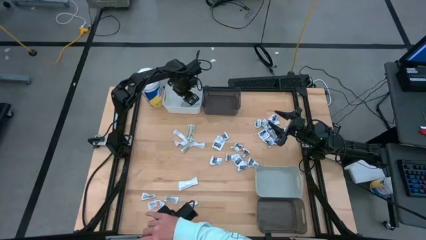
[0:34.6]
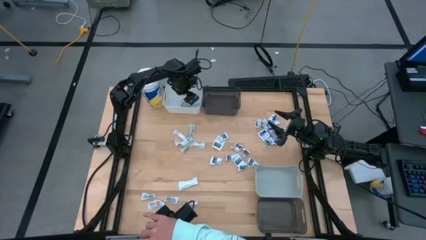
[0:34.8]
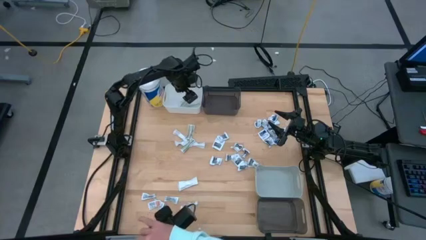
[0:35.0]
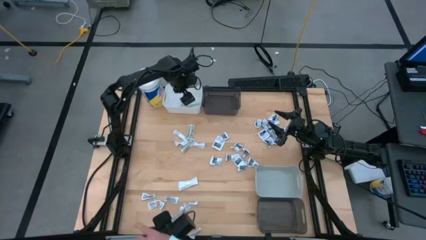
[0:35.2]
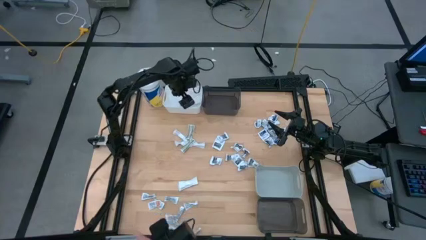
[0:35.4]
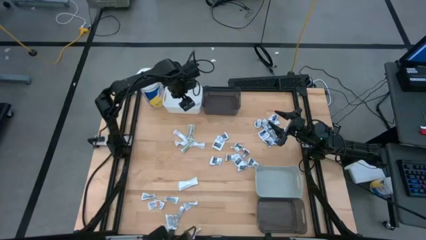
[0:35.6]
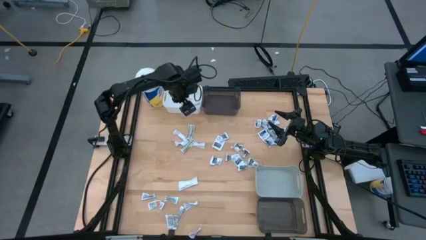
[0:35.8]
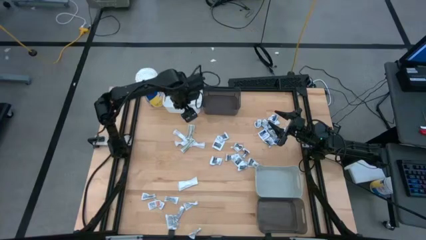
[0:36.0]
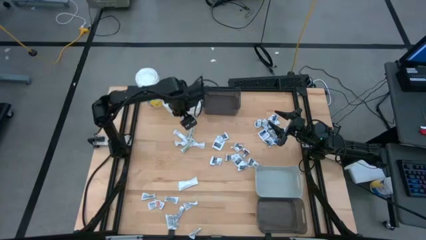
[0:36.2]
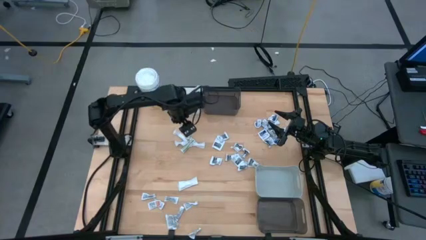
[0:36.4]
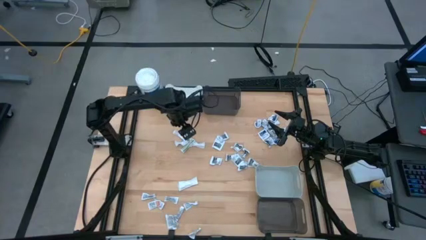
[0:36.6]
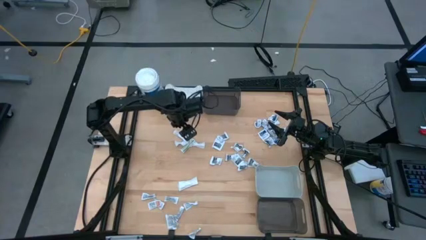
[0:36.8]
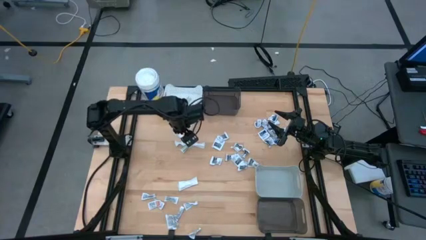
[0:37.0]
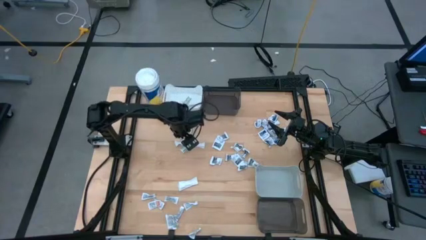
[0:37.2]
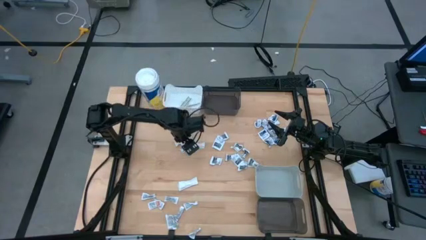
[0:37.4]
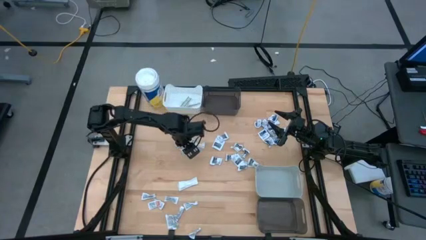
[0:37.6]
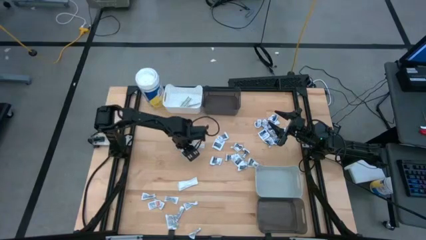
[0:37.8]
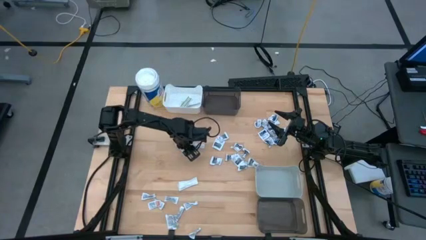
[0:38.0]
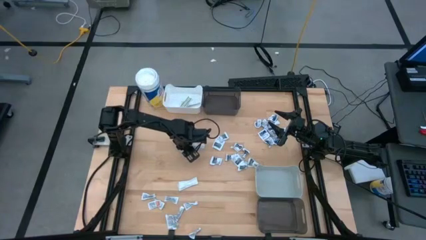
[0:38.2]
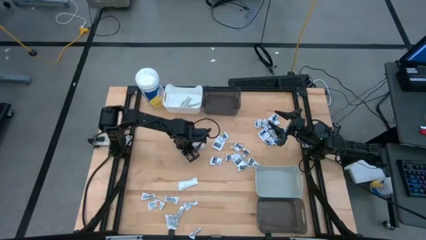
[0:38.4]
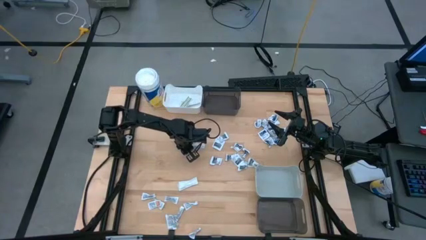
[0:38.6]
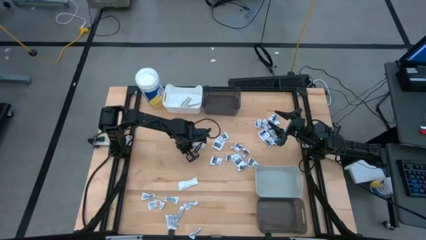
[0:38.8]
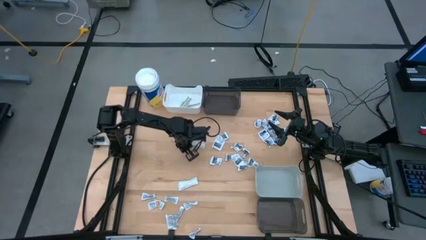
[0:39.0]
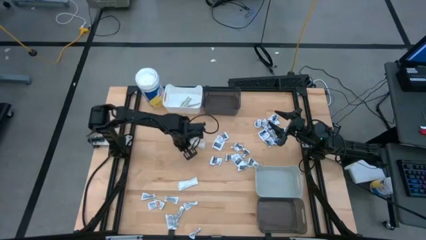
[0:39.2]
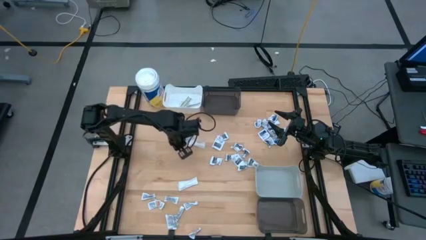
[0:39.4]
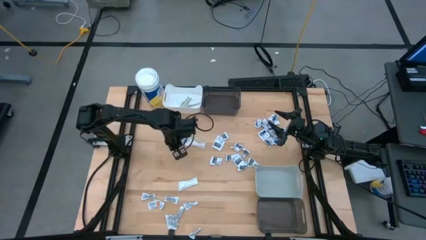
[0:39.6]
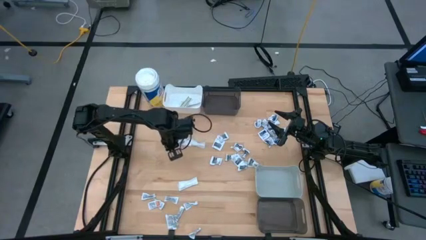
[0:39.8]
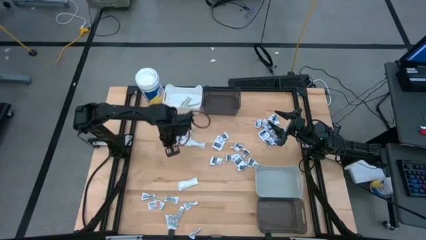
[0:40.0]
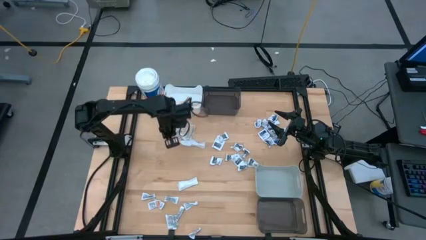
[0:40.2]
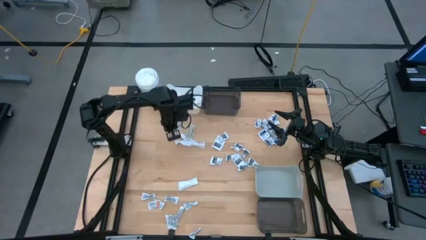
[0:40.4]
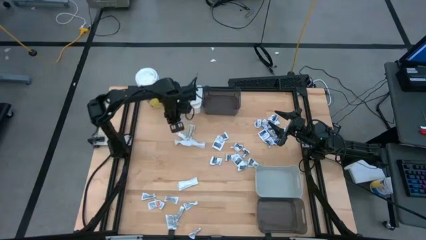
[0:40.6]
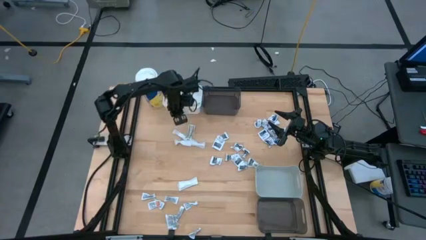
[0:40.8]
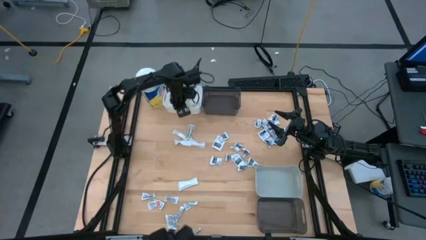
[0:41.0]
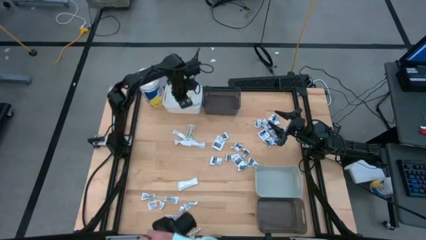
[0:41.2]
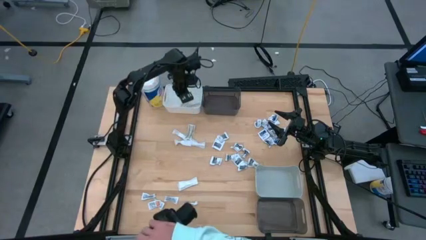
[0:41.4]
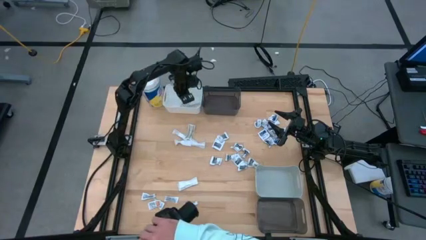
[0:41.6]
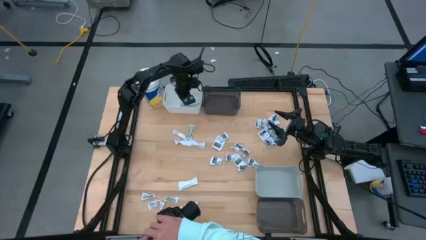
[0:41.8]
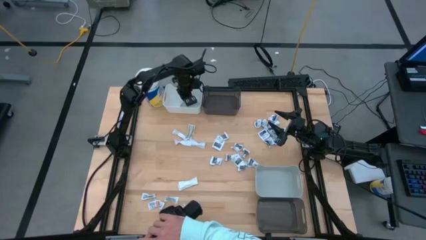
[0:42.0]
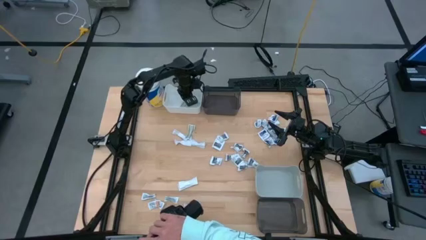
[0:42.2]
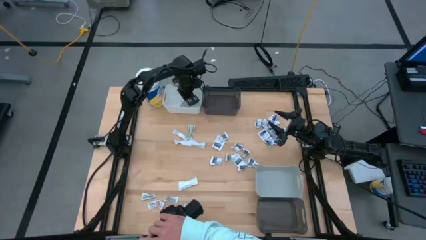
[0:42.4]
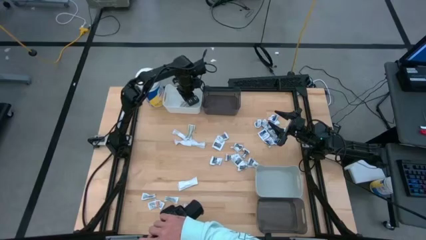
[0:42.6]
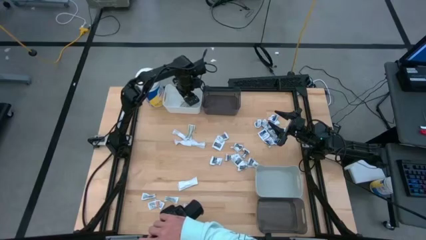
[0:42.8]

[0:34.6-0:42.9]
Task: Pick & Place First Aid Supplies
Put the green bandage into the white bin

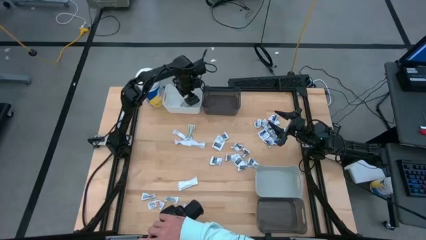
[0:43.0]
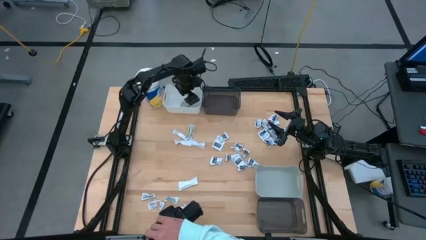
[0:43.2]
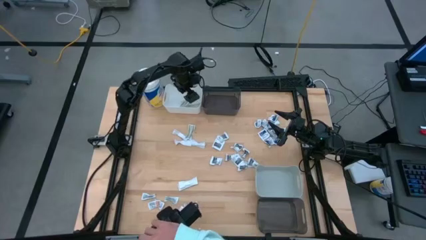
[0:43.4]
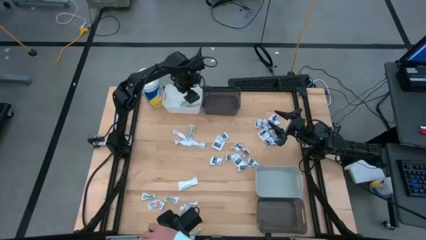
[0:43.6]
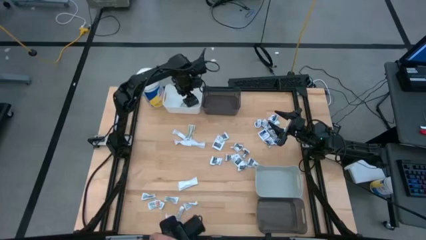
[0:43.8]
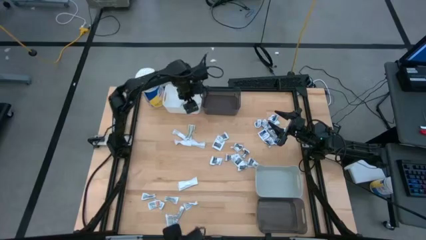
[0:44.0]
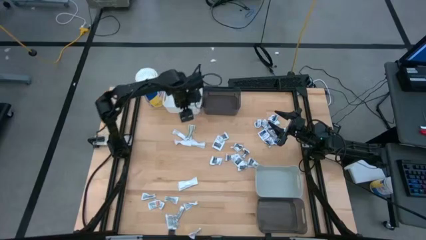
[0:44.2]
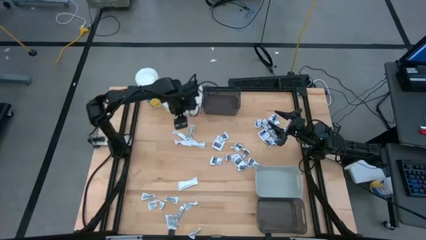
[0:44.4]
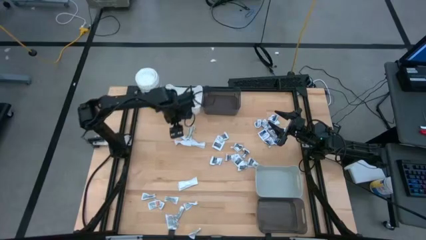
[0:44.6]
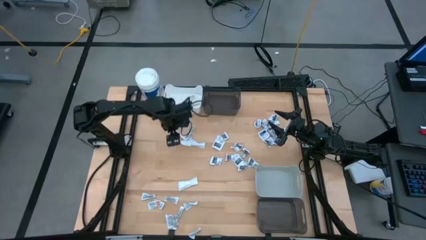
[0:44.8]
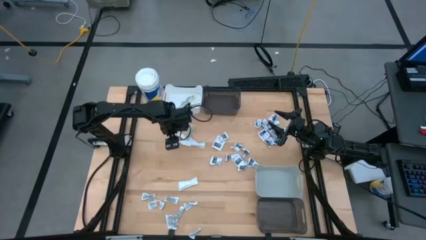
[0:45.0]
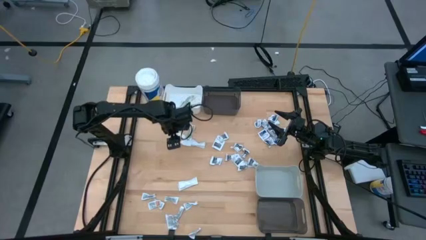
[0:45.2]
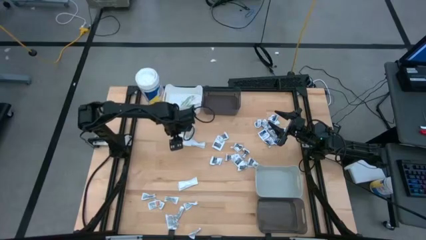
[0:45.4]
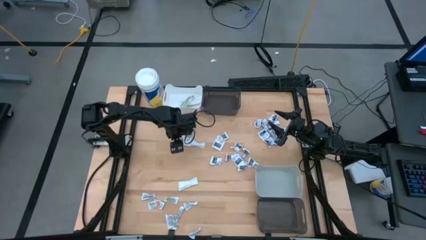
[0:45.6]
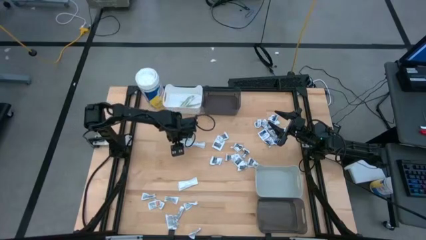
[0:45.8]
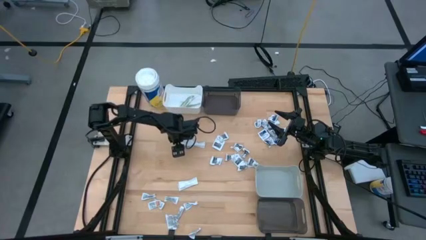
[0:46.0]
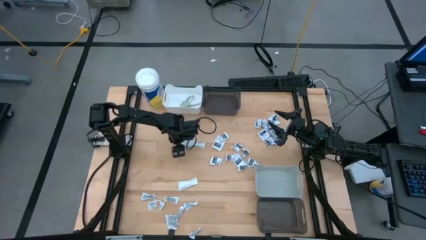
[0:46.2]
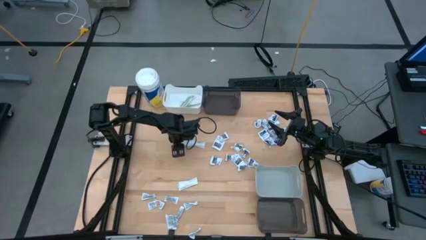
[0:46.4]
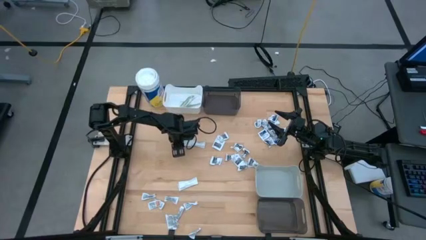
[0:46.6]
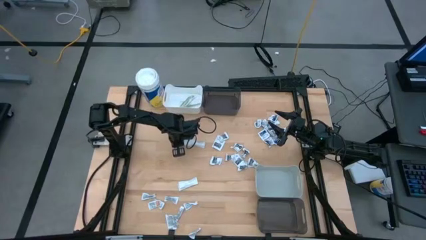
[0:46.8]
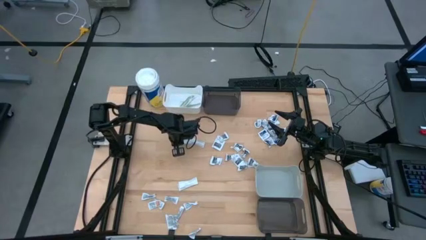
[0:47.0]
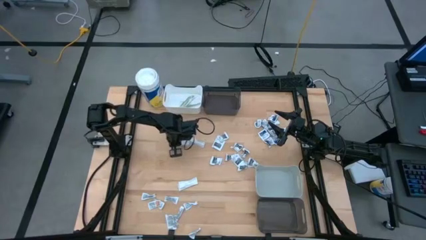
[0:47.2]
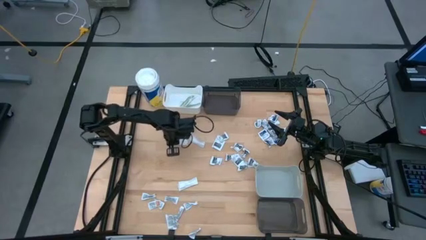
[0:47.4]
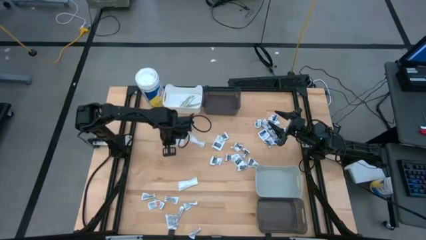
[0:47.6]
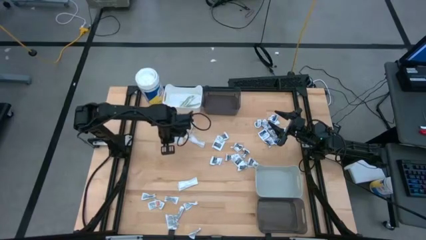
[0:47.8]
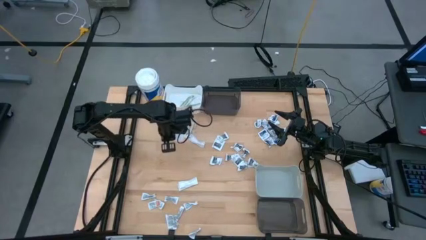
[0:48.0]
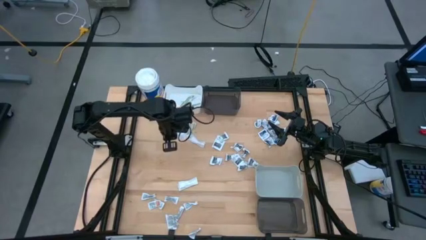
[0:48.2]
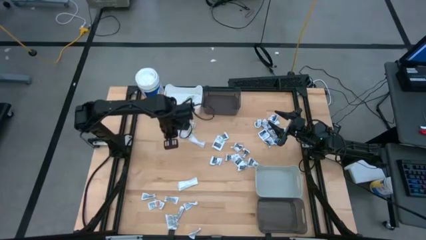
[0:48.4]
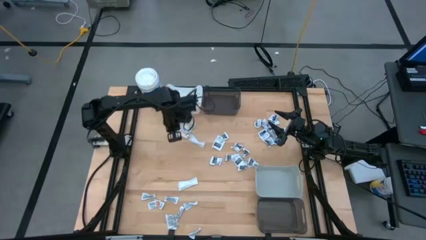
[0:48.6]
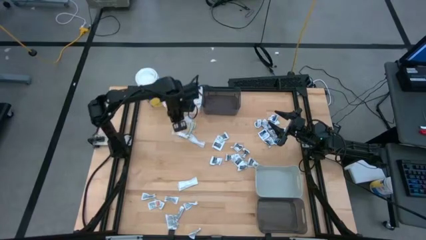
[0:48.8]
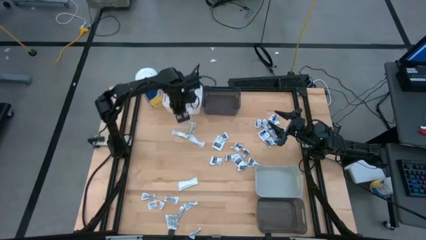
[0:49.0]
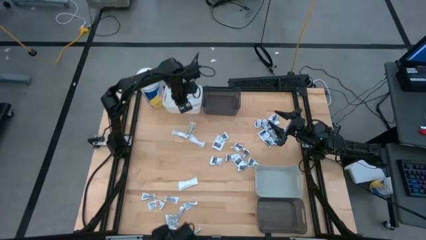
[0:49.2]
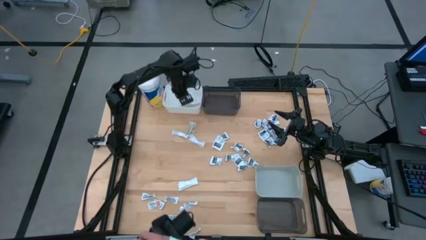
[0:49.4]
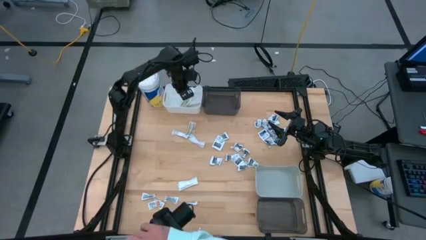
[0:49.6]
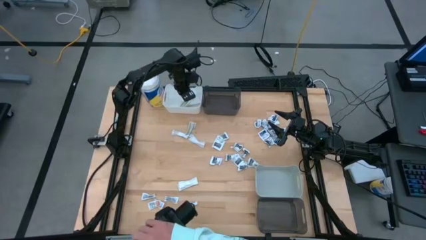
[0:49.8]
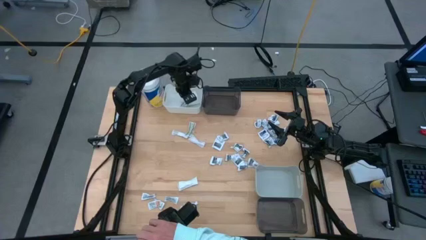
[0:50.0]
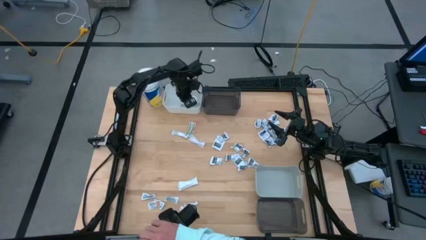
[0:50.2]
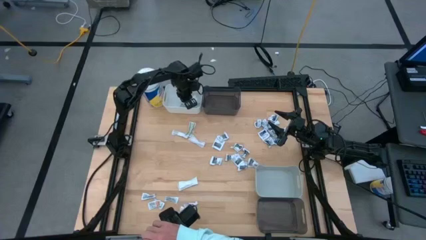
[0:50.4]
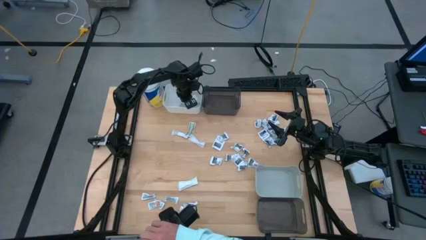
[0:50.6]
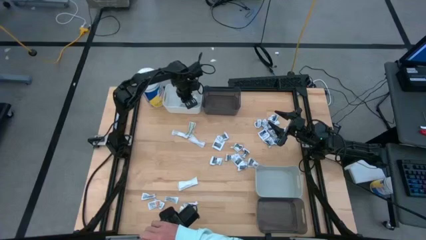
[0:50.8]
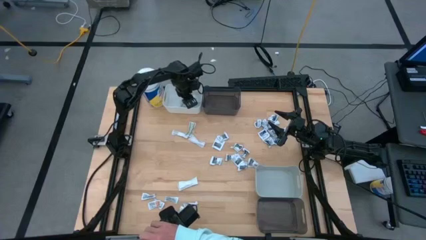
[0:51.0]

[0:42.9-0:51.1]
Put the green bandage into the white bin
